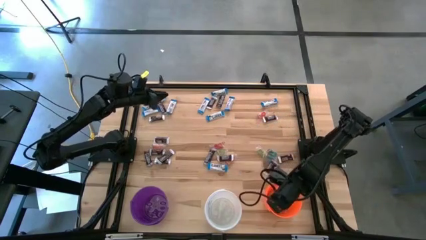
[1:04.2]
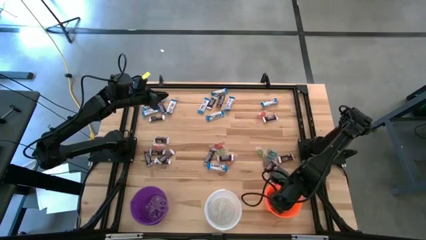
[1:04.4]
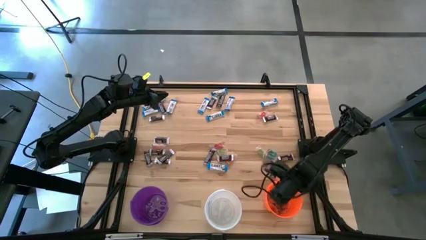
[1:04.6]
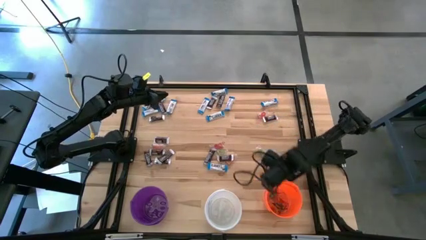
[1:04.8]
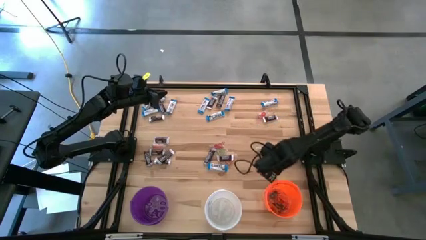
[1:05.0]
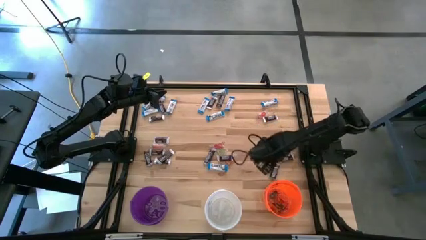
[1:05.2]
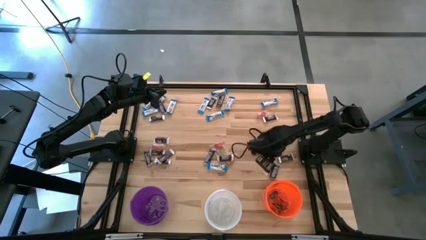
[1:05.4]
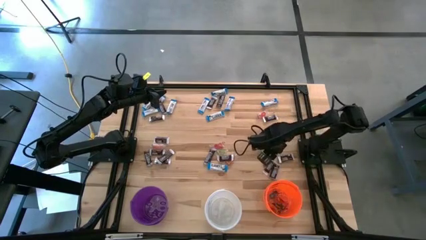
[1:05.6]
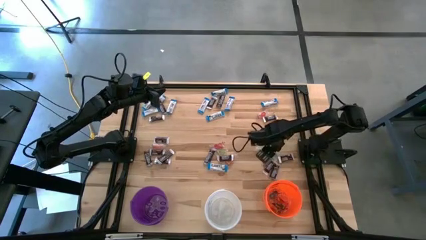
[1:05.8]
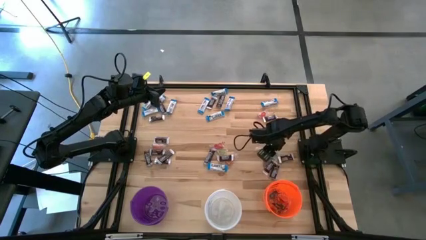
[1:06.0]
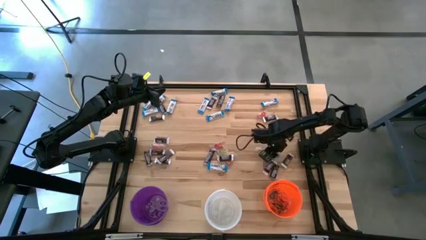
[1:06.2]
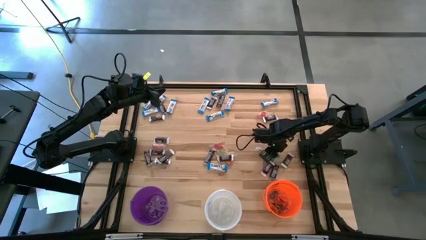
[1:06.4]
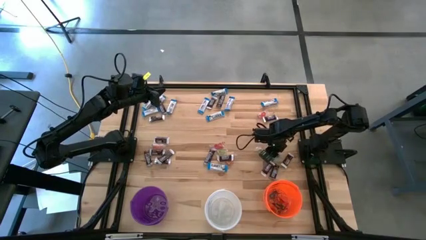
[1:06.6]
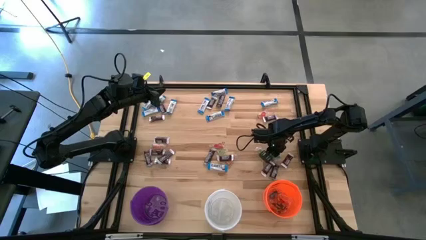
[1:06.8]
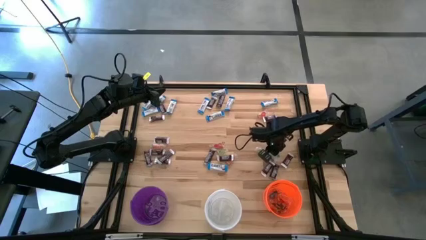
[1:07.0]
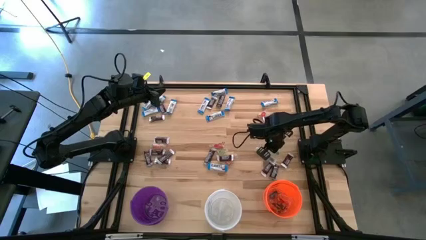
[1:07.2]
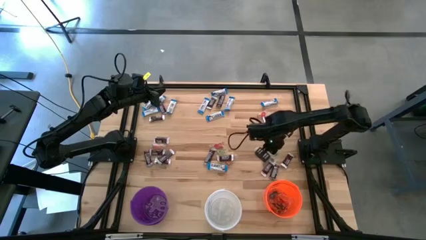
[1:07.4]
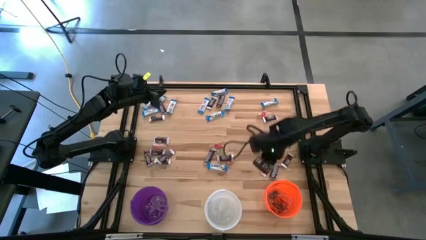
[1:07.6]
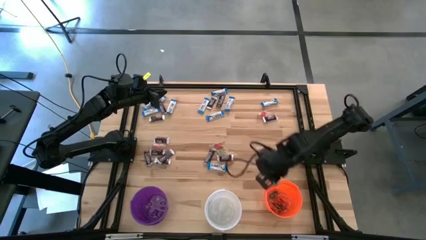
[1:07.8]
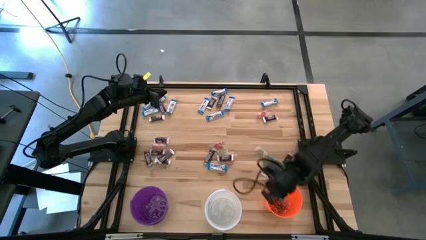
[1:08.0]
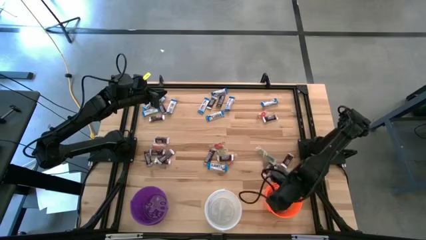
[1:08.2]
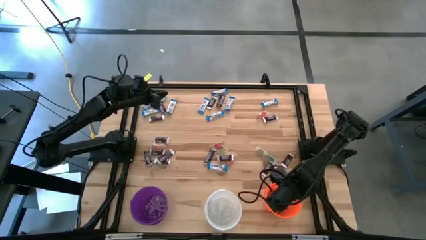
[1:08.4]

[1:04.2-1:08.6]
Task: Sort candy
Put the blue gummy into the orange bucket

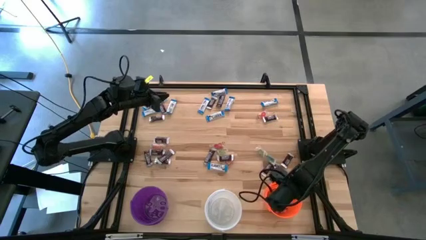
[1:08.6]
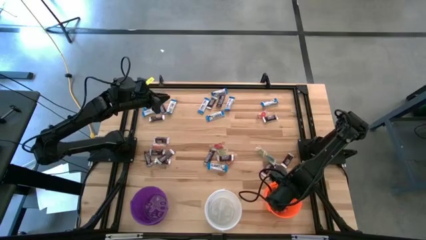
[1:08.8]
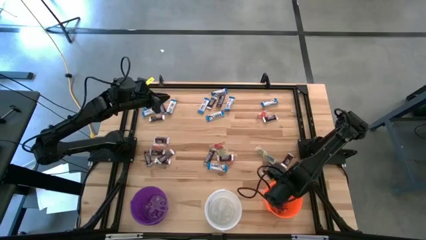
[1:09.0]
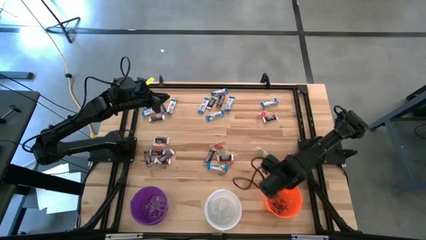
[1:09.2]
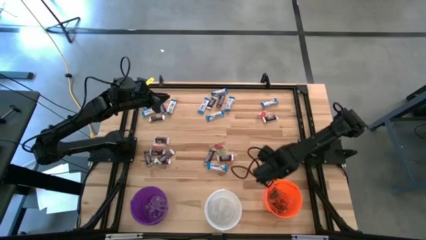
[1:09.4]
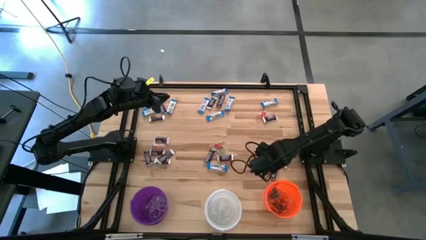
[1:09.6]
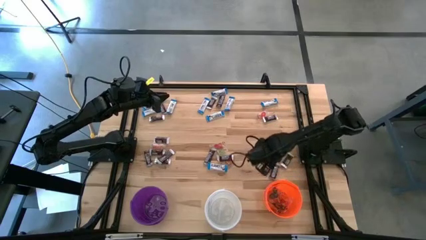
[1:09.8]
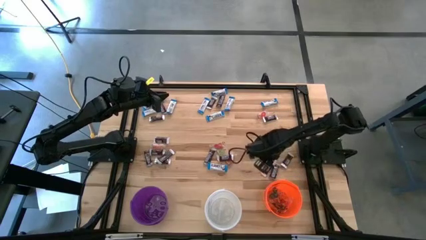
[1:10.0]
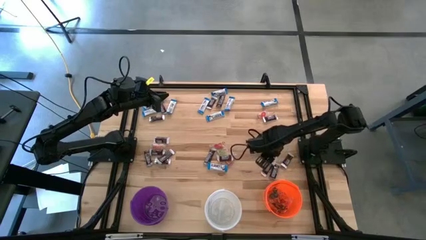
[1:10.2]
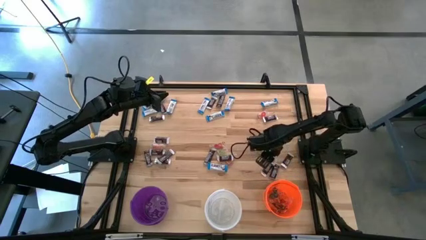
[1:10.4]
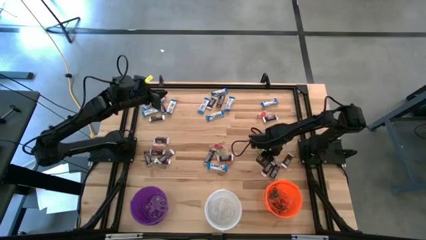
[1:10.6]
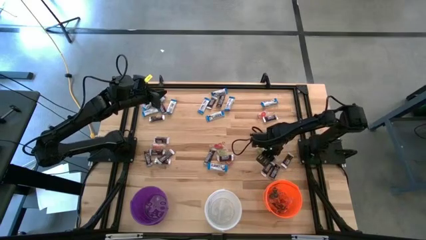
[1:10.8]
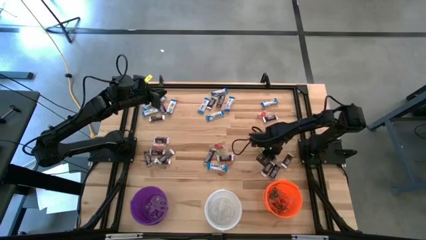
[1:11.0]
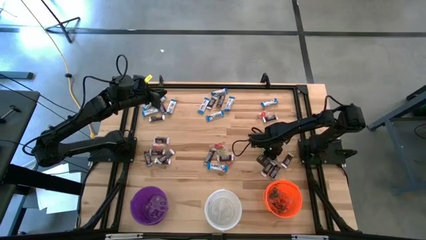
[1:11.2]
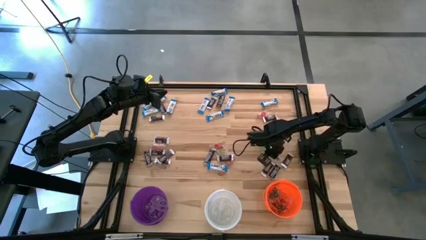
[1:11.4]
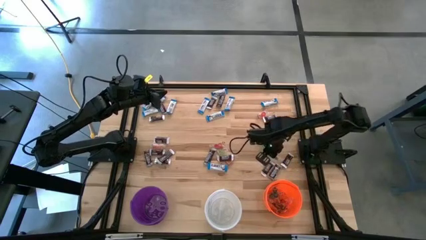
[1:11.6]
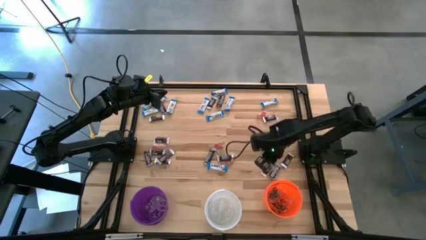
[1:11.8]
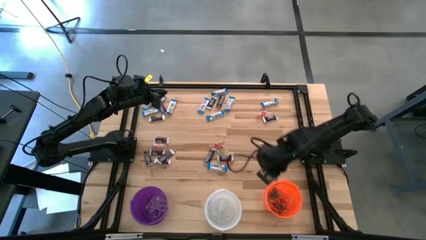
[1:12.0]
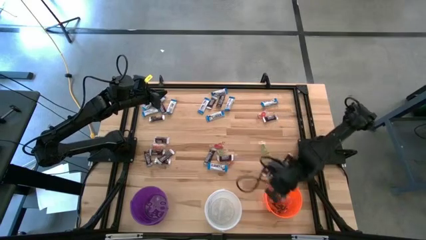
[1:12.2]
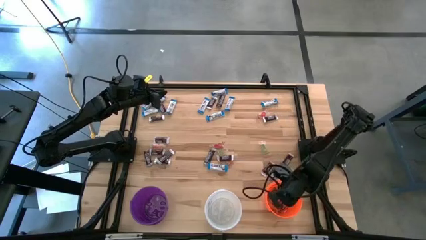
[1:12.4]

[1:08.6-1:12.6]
Put the blue gummy into the orange bucket

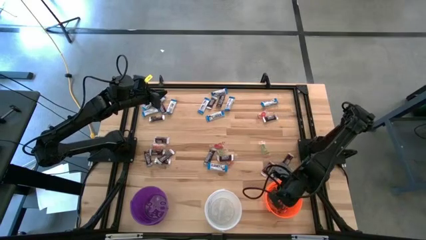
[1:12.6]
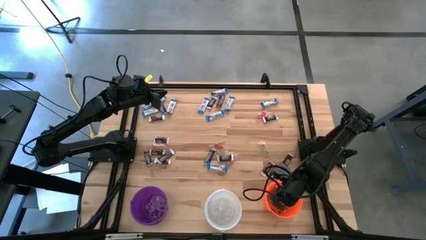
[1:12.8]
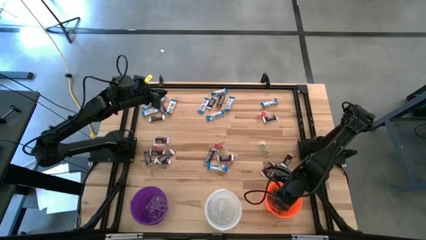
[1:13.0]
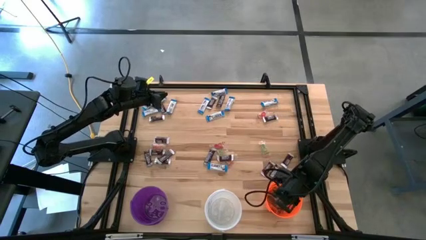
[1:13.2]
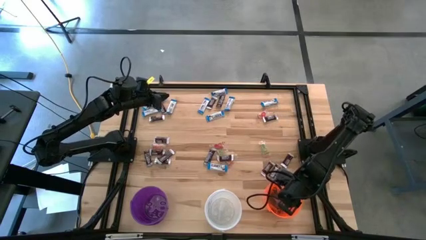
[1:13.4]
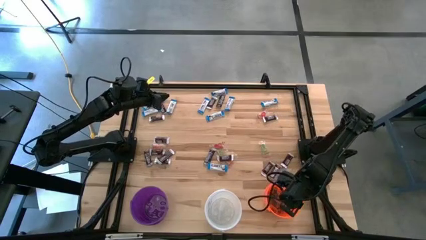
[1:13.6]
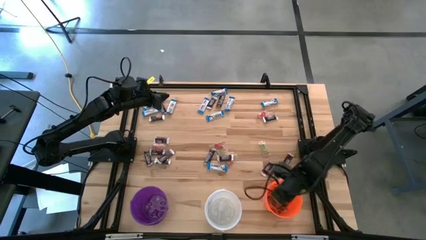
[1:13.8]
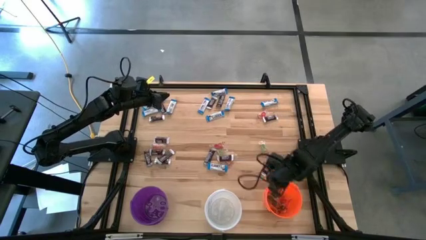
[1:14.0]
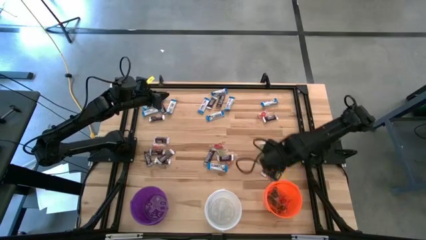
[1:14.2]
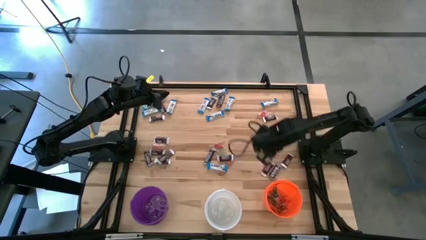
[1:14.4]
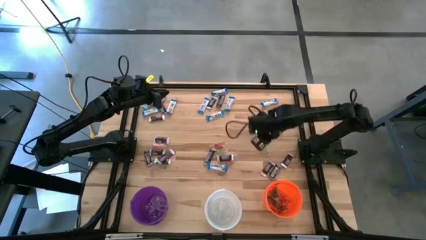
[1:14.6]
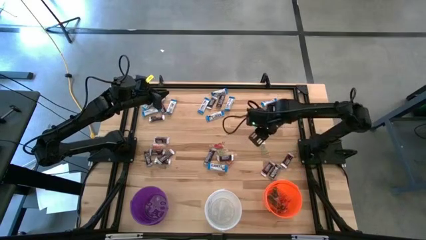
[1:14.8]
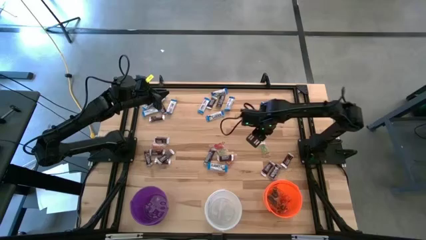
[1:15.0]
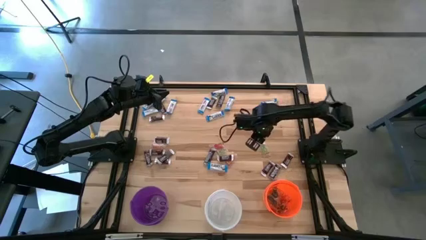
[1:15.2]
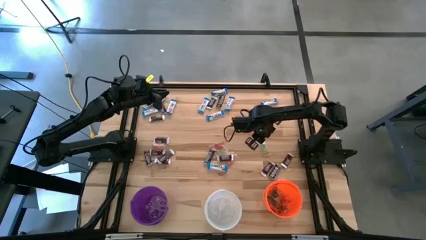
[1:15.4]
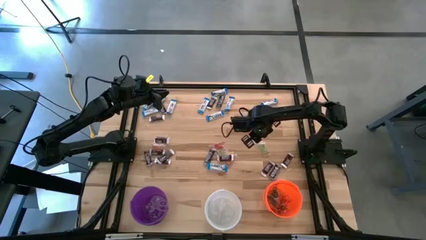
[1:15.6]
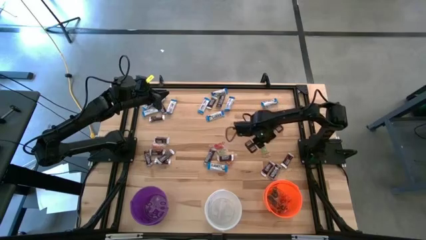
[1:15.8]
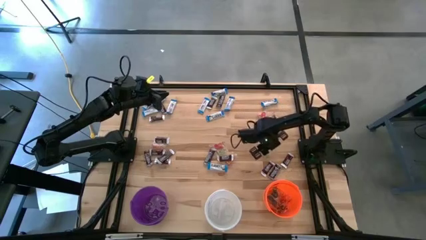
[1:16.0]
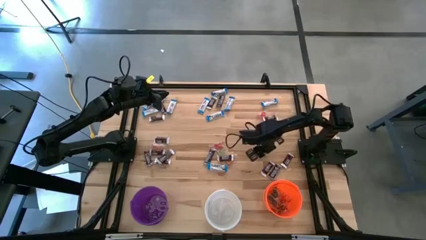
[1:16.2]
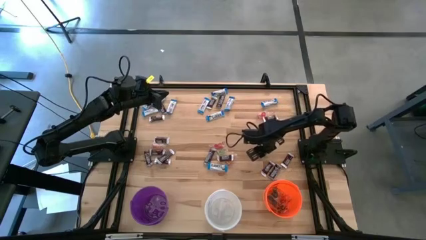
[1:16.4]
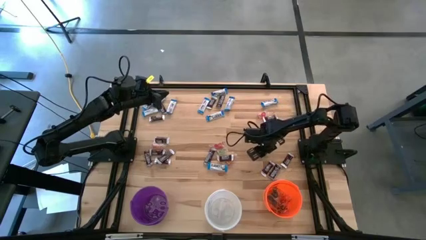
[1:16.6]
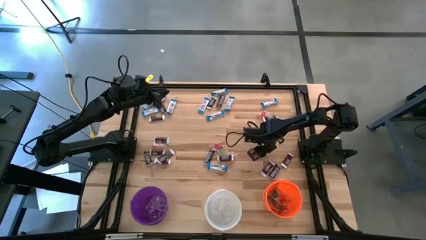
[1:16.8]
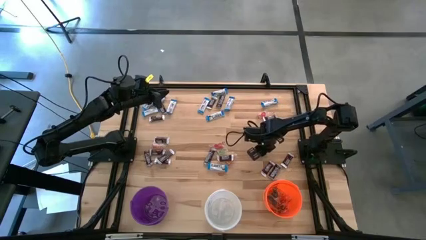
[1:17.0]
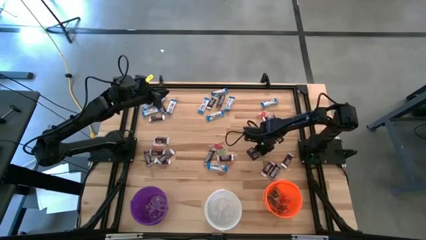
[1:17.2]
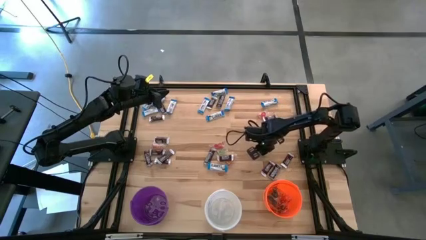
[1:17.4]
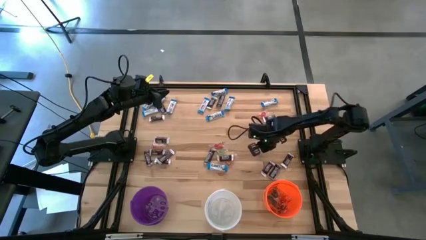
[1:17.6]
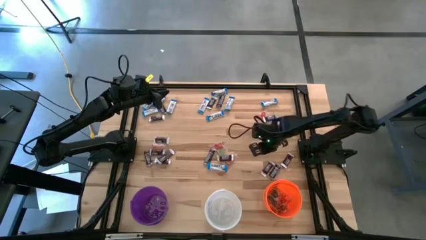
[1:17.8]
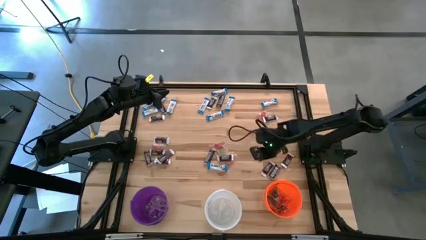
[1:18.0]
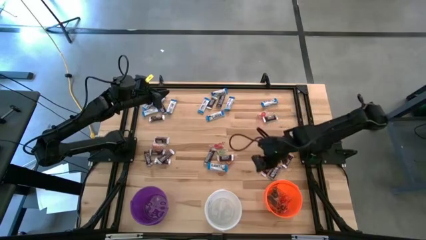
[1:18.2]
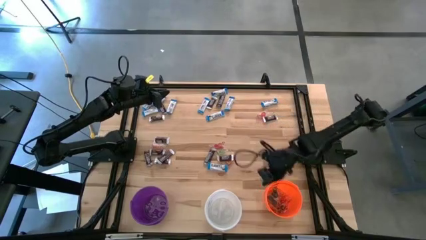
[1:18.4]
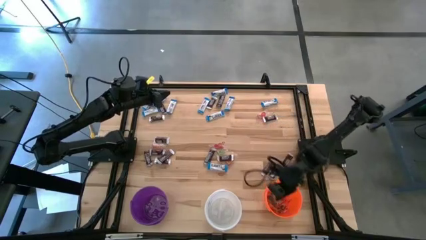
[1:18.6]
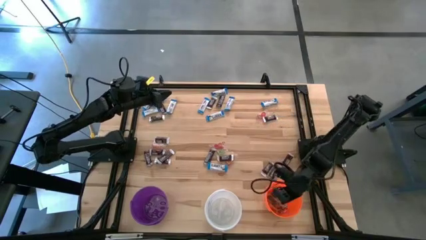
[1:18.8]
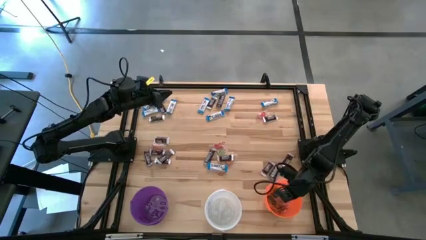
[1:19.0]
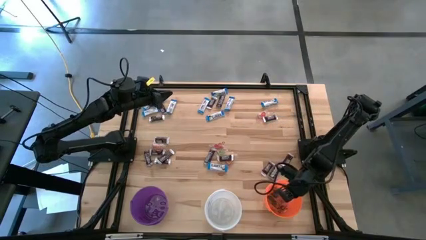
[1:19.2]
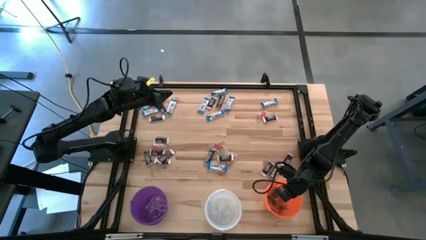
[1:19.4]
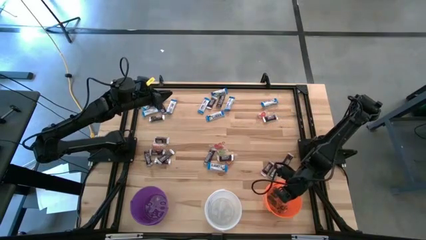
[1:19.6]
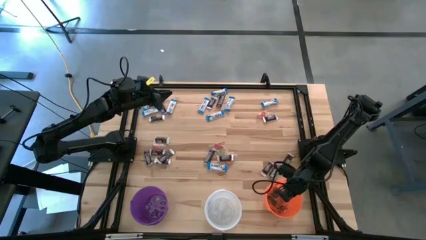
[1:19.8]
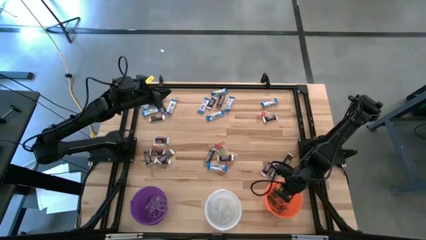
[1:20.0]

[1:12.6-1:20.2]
Put the green gummy into the orange bucket
